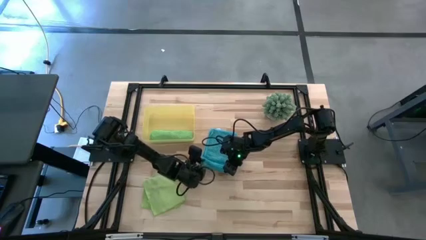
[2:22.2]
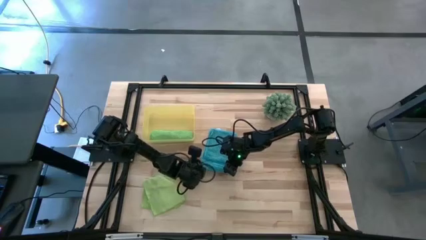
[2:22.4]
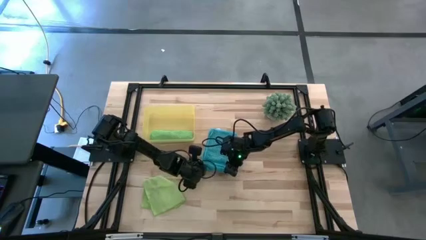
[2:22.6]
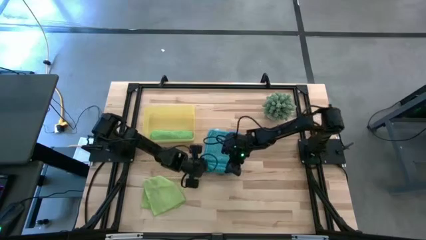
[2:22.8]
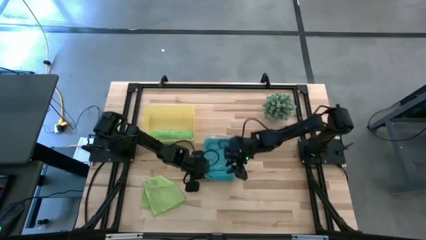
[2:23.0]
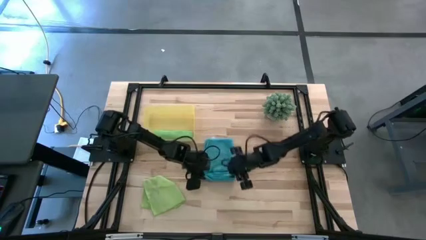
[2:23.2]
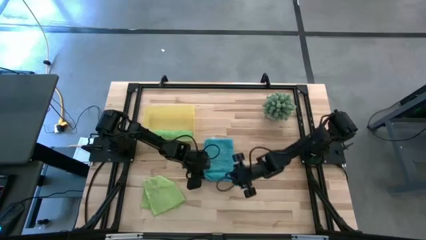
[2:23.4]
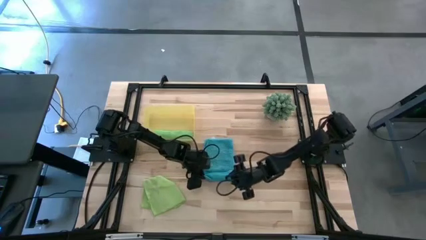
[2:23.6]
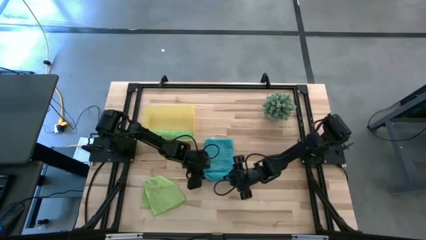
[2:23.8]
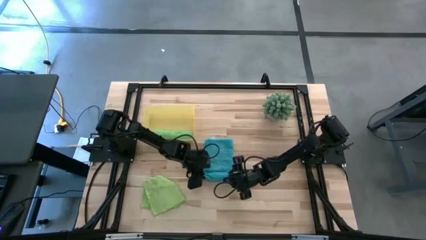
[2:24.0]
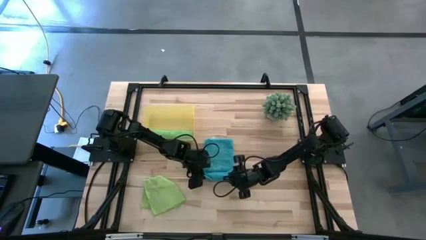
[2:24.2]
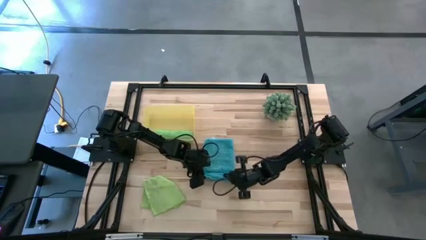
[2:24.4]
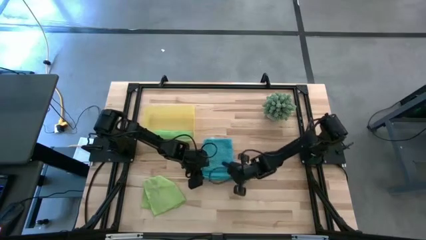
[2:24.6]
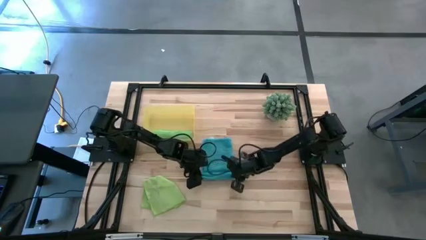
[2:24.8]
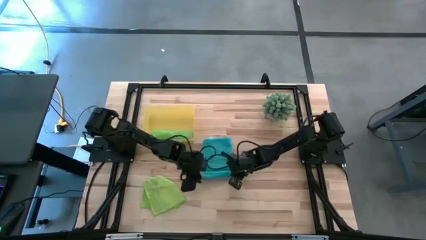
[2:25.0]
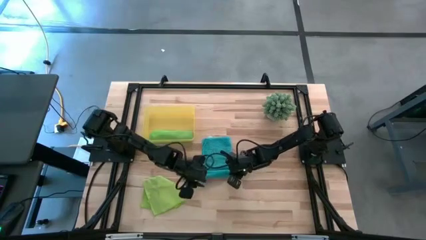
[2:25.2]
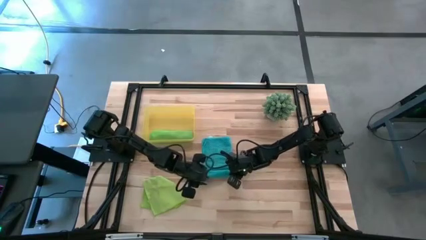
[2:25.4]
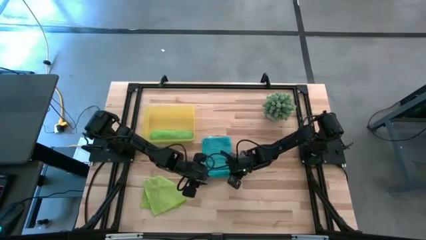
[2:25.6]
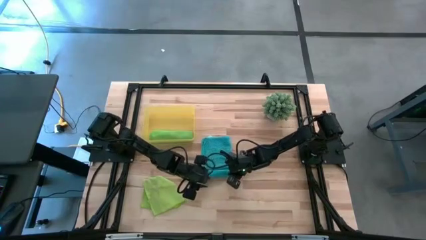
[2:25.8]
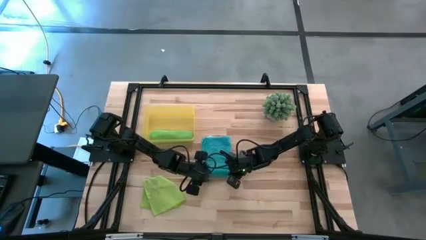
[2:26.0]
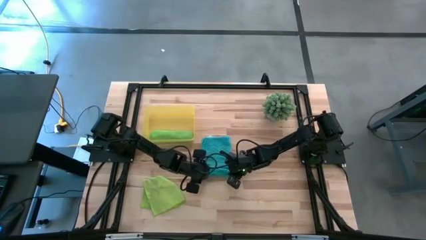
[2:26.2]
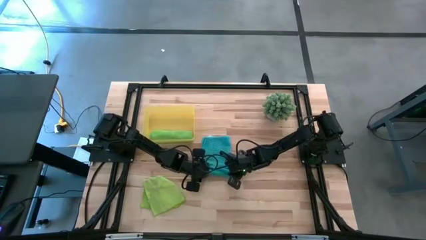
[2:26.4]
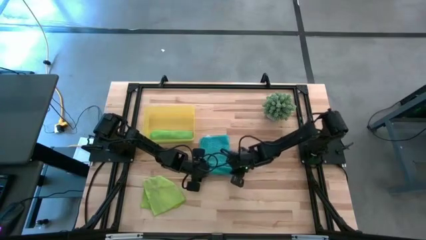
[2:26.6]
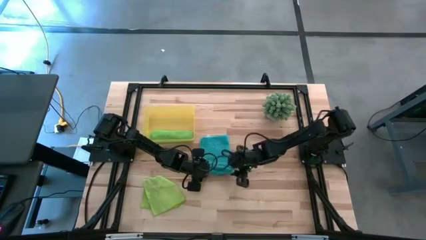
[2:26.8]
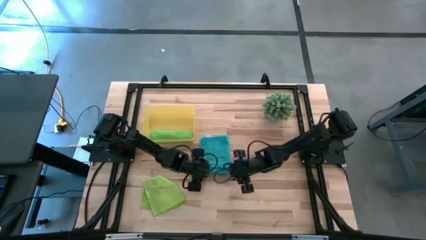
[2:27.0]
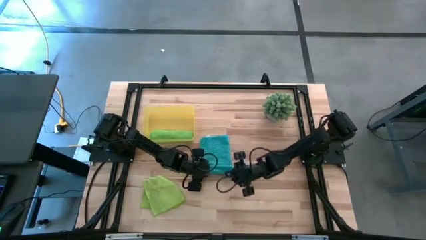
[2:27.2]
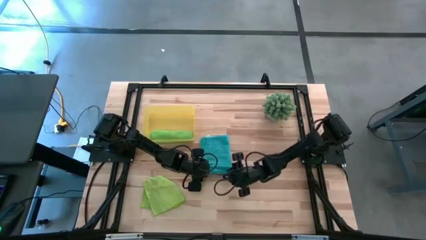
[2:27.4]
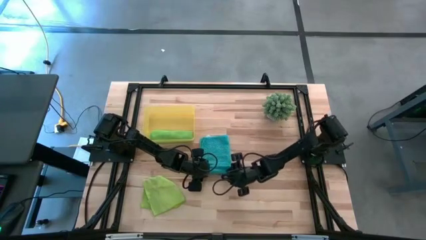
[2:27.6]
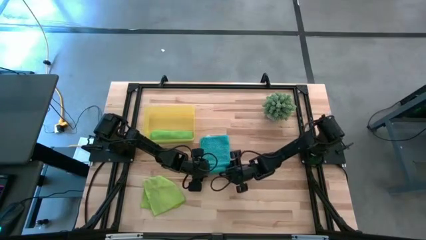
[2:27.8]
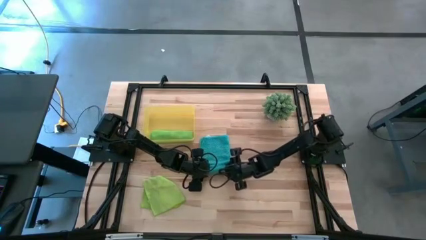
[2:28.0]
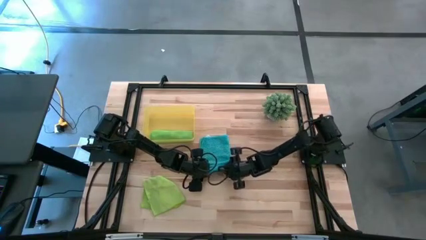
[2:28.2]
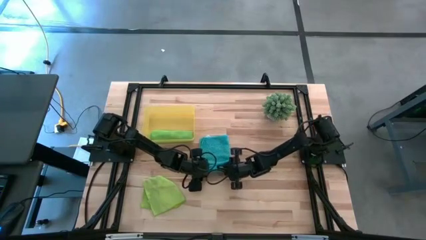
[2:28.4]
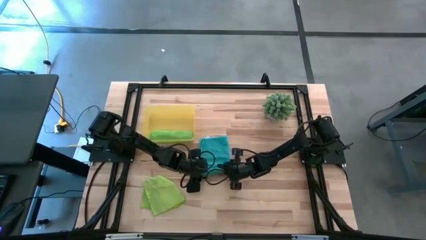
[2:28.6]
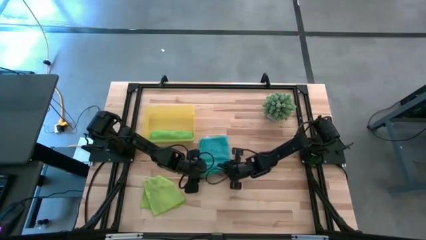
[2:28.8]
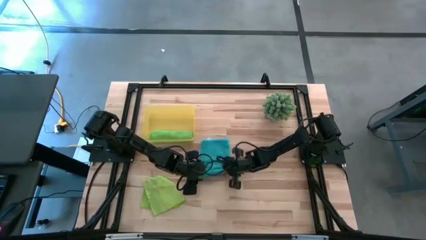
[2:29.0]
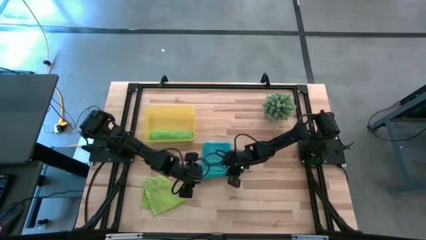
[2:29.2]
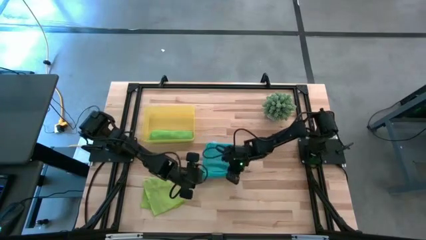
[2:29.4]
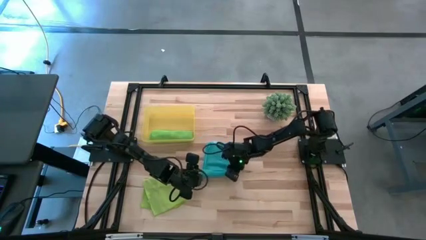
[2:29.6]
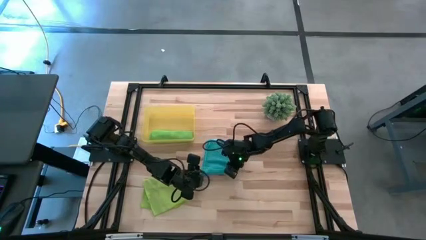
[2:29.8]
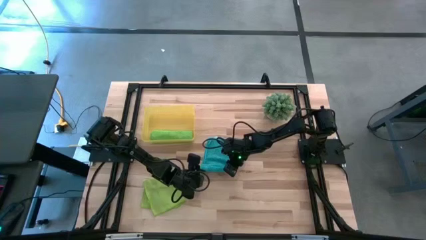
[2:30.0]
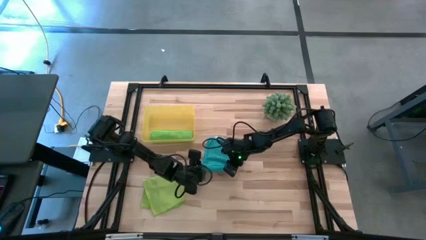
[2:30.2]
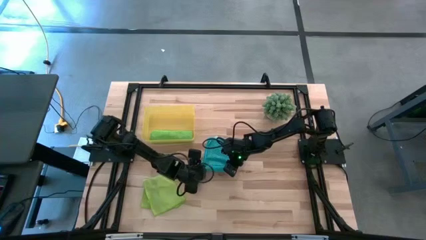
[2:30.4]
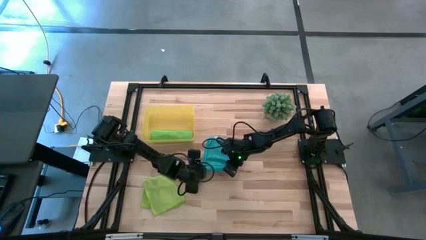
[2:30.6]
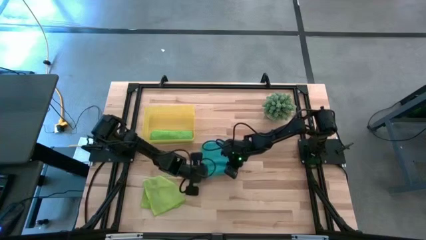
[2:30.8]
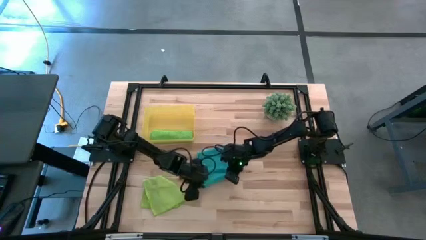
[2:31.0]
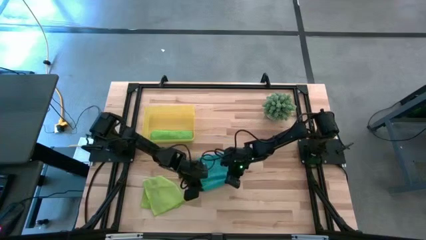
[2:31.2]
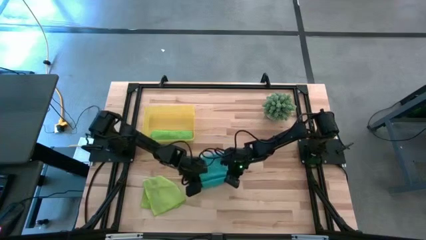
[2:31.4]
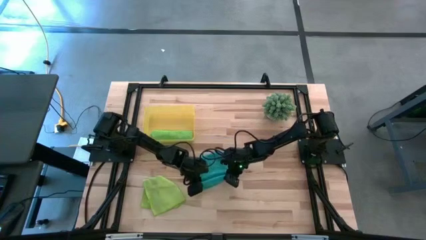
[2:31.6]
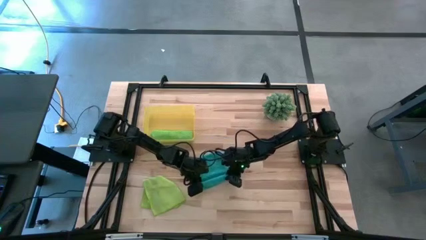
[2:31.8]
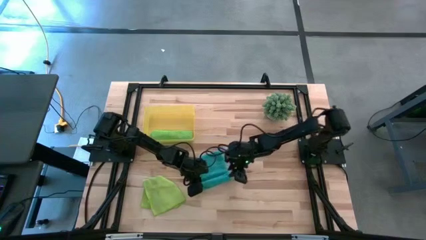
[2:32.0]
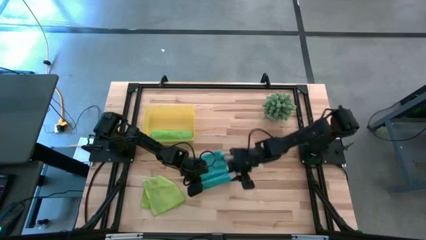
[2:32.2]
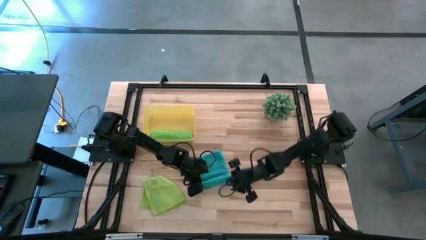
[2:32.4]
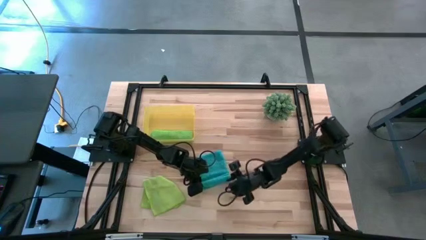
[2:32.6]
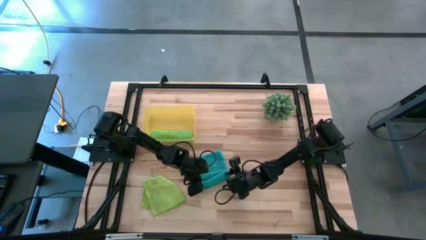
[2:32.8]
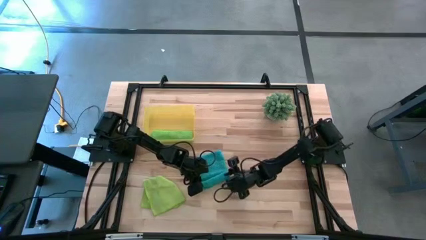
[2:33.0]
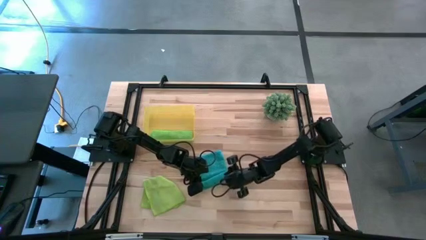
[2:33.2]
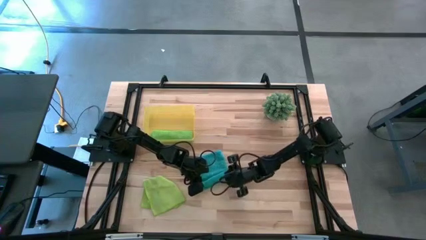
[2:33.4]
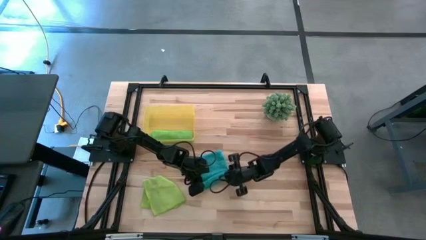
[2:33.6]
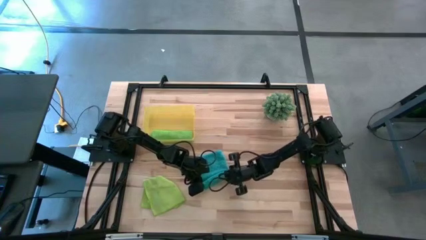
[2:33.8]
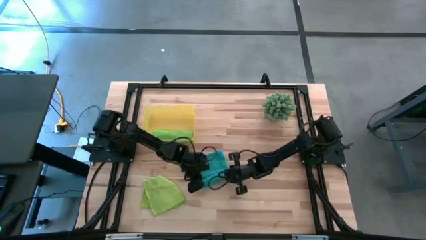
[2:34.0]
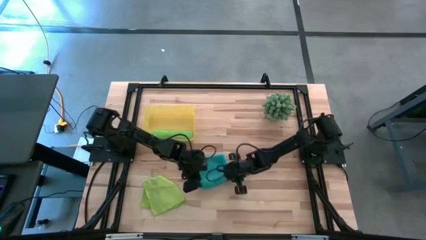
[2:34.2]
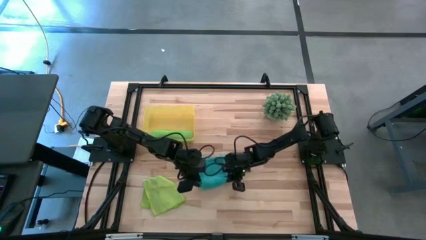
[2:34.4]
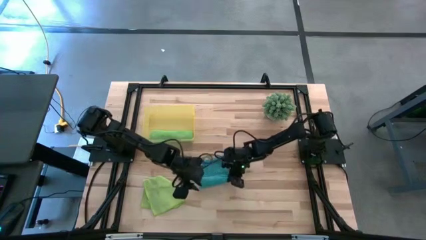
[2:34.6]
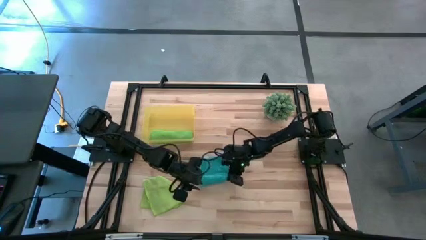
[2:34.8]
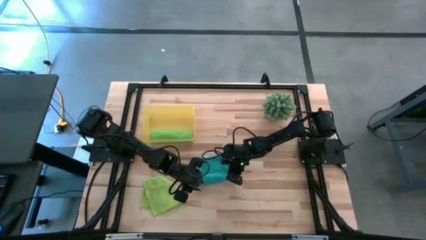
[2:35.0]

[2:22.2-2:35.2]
Task: Roll microfiber towels into tight, uniform cylinder then place into a basket
Roll the blue microfiber towel

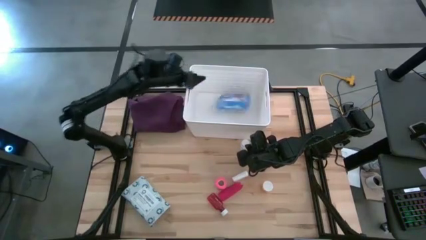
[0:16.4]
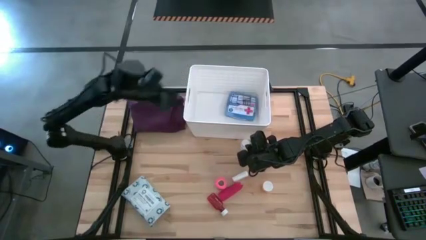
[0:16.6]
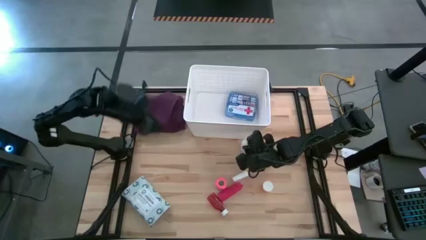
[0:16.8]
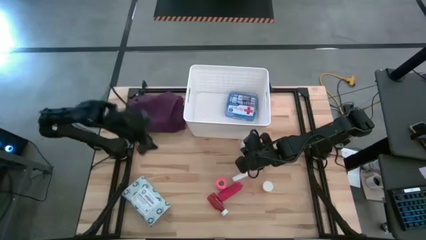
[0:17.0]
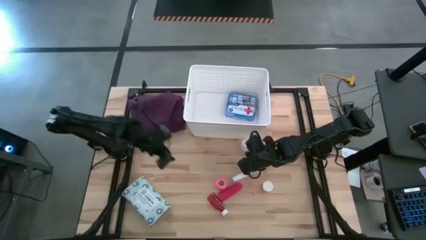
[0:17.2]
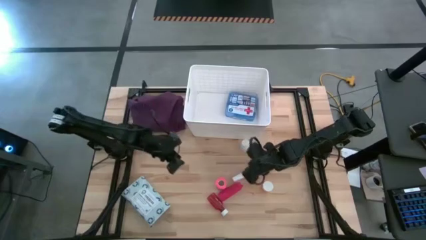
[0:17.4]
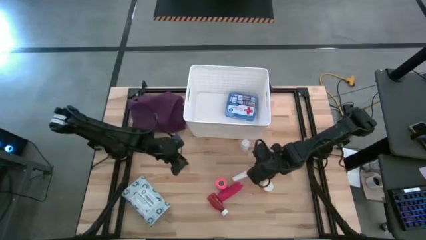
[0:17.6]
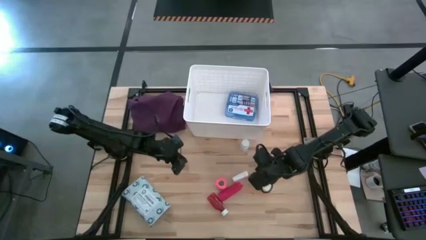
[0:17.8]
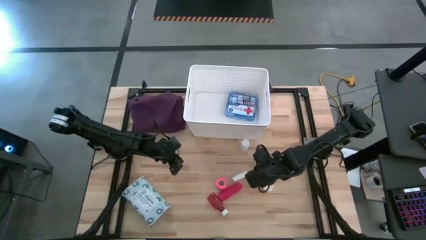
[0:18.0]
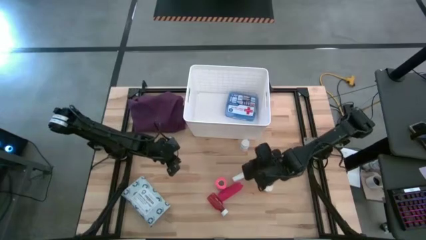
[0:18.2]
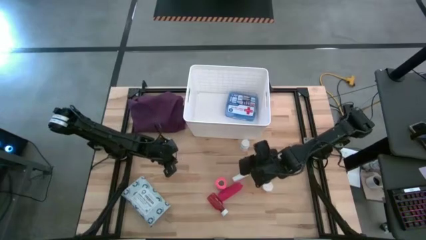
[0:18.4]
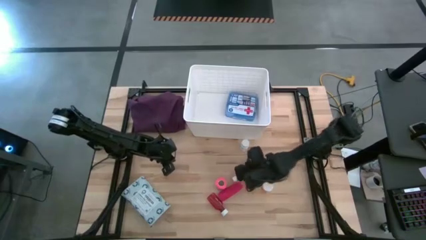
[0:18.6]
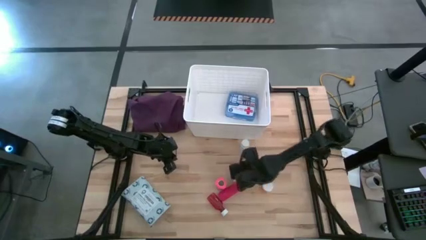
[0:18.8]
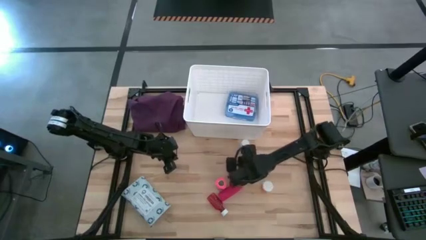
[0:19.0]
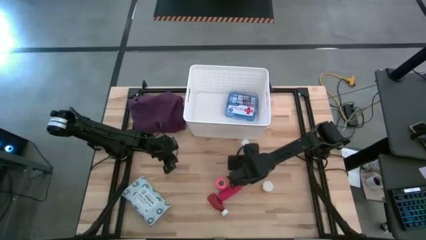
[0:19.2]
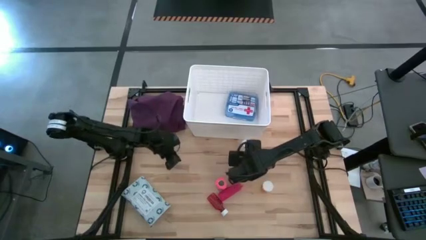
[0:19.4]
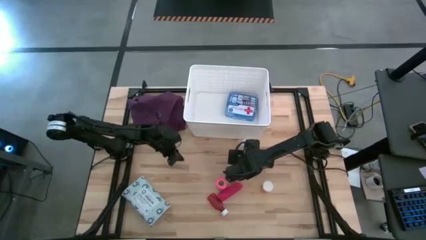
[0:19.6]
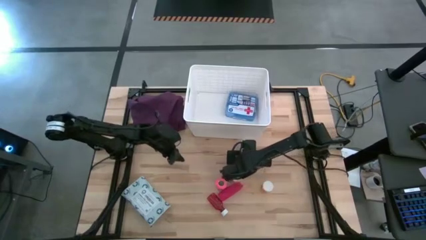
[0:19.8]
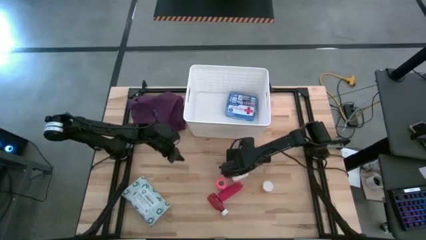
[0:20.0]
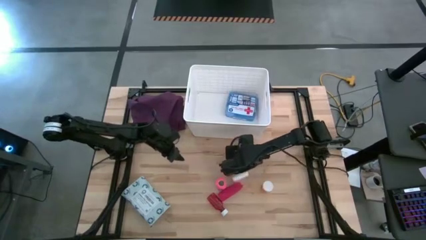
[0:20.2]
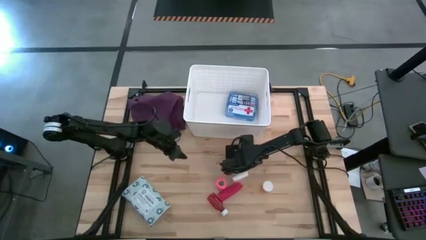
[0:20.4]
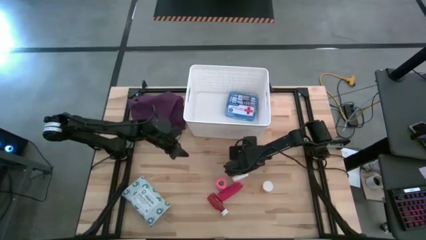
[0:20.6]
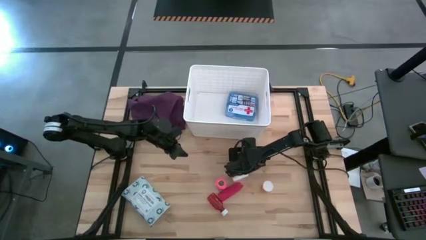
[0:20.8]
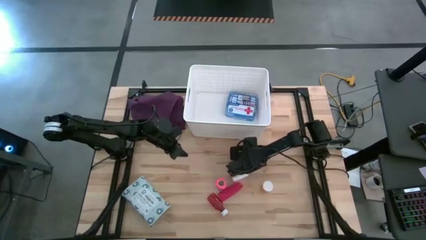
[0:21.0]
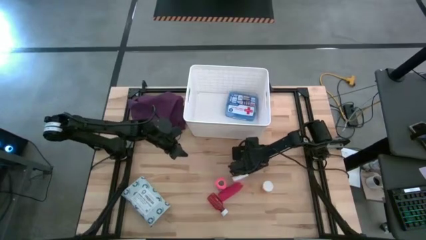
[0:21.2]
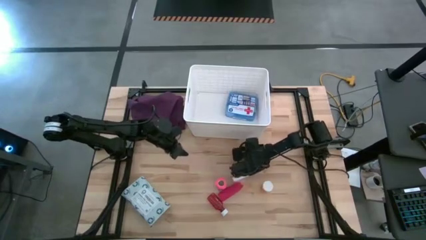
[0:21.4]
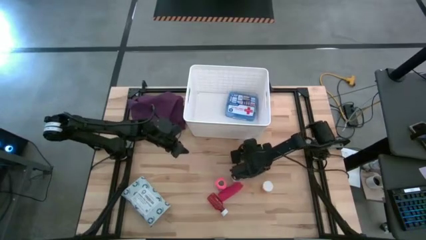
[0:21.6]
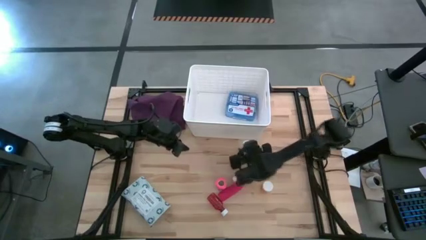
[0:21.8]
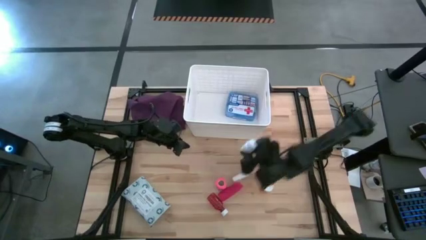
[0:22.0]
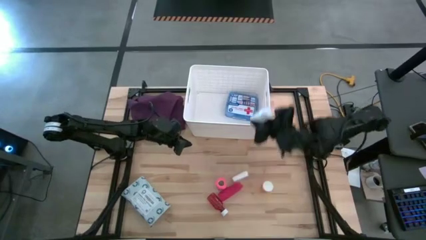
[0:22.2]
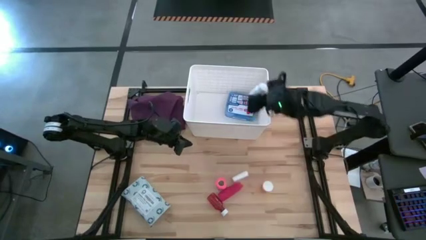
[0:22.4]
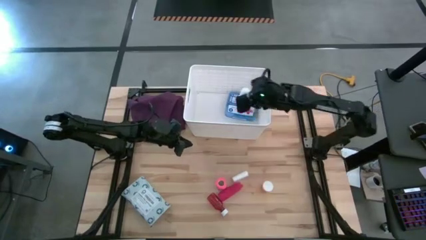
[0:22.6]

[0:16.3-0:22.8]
Task: Pick & place medical supplies in basket/bin
Put the white medicine bottle into the white bin
